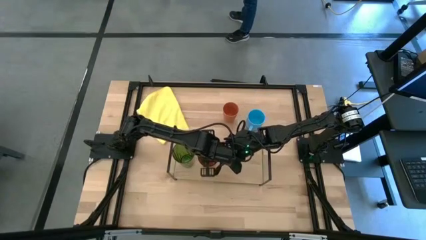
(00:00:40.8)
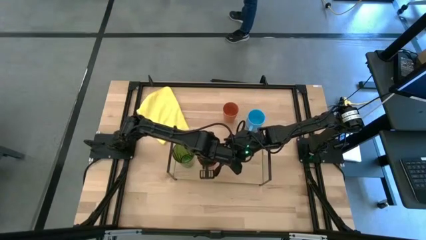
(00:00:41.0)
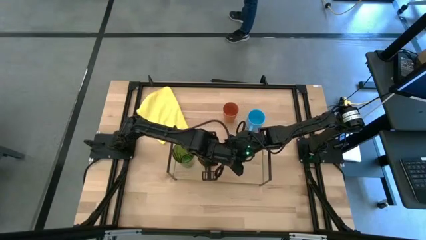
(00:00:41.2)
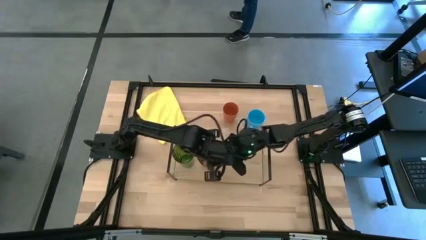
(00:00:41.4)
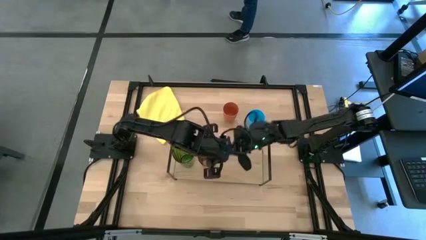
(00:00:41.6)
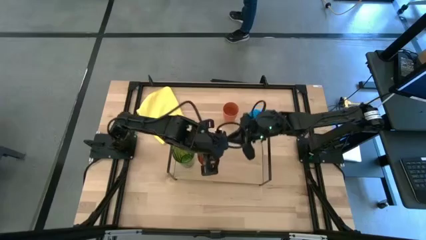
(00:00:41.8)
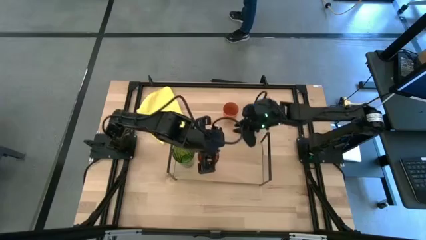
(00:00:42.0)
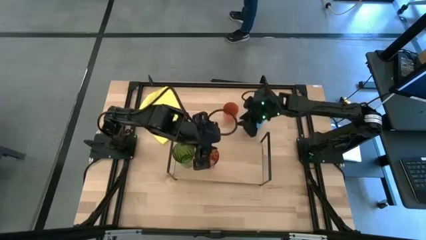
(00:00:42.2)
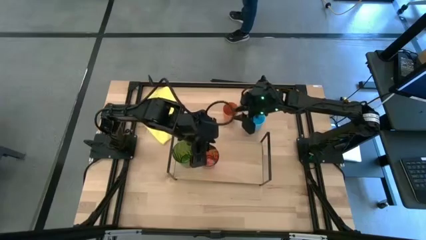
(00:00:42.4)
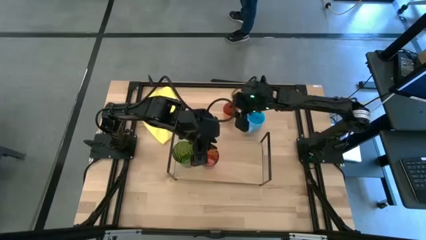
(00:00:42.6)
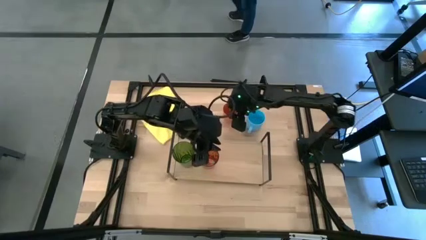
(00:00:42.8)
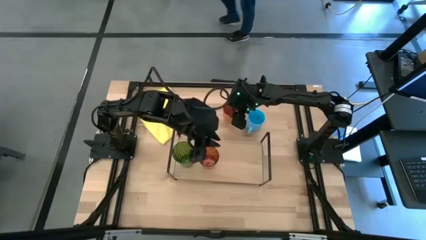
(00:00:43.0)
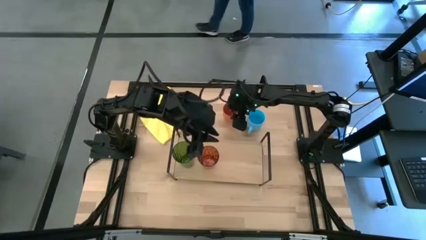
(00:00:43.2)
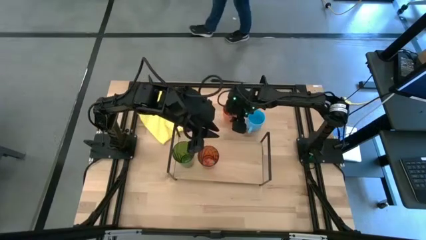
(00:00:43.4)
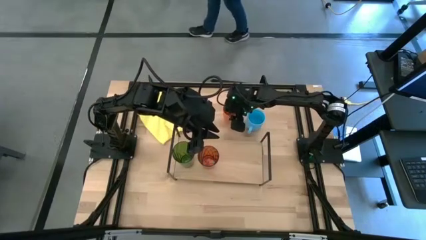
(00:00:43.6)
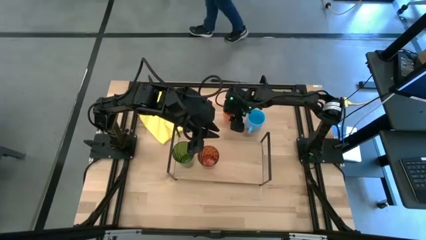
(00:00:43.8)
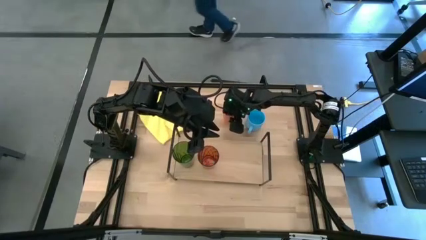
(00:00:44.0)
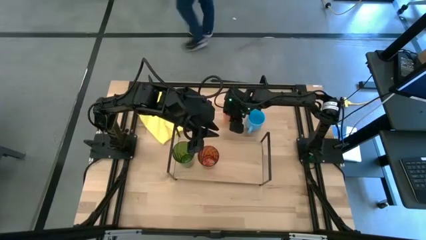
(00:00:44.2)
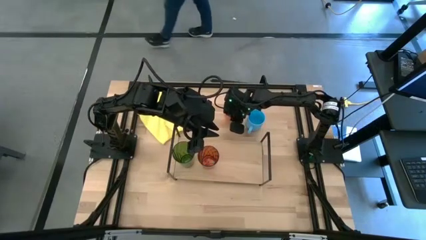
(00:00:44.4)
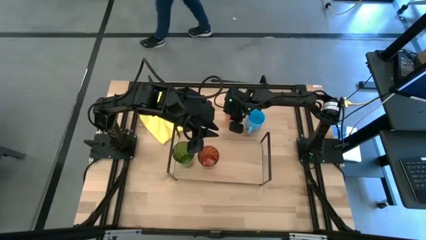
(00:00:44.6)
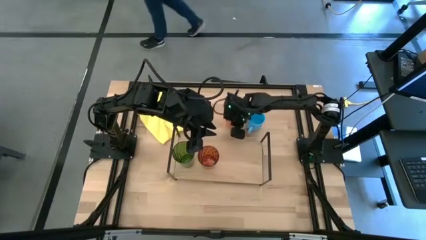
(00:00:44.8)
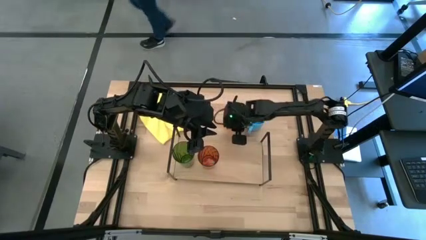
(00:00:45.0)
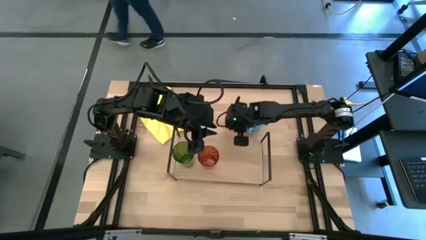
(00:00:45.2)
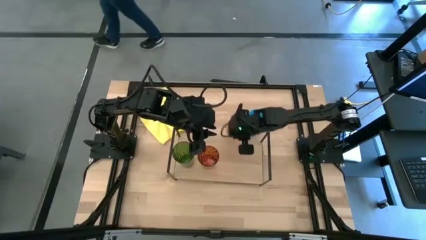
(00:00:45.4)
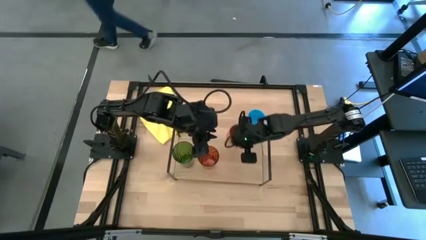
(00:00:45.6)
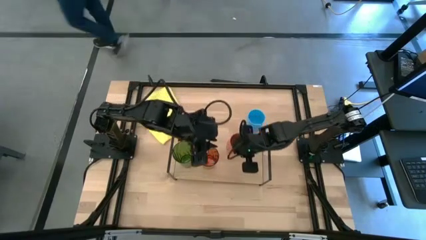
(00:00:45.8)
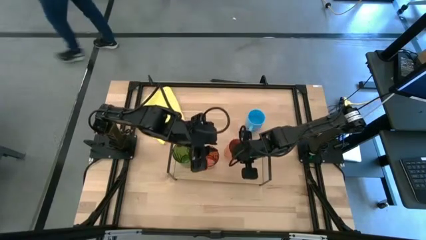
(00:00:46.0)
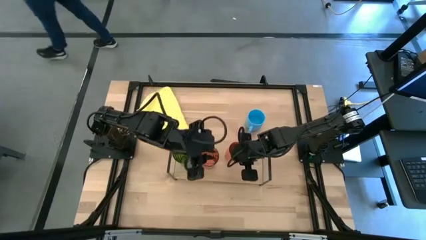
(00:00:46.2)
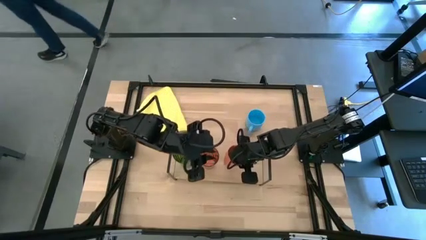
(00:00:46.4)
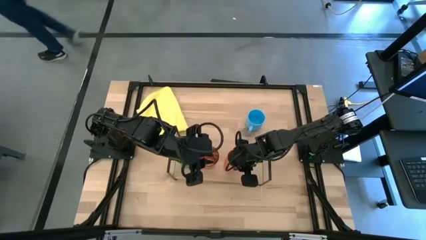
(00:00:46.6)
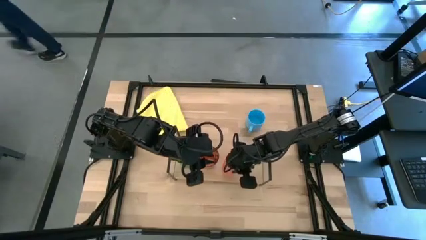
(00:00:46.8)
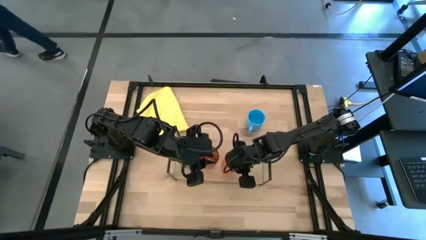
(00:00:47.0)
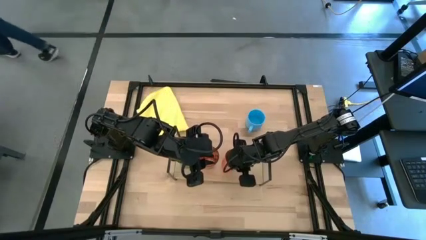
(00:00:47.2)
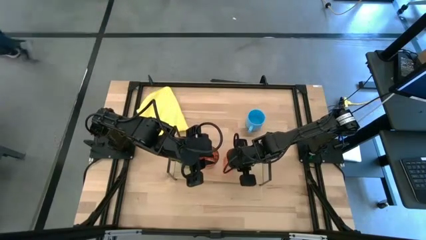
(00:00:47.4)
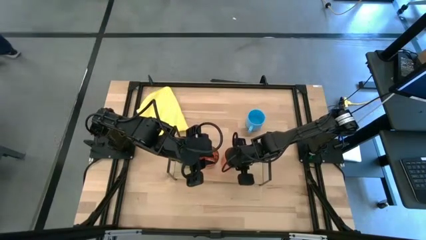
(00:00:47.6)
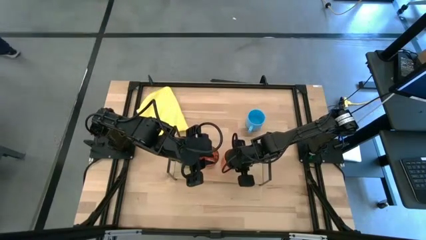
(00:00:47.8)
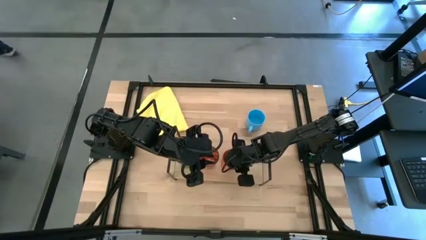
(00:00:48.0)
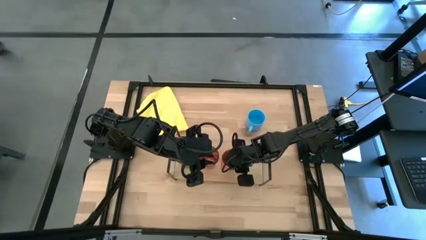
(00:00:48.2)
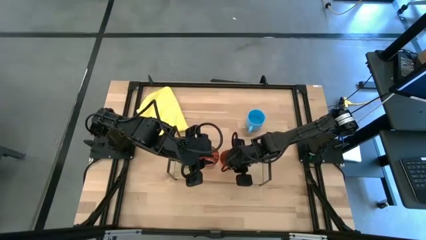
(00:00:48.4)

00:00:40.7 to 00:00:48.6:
Task: Stack small to large cups/mugs on shelf
Put the orange cup on the shelf

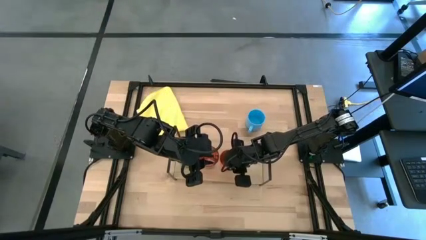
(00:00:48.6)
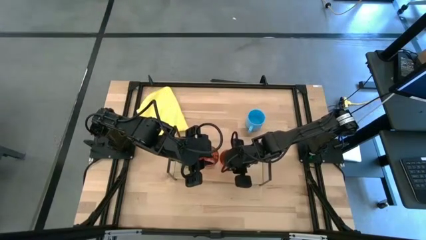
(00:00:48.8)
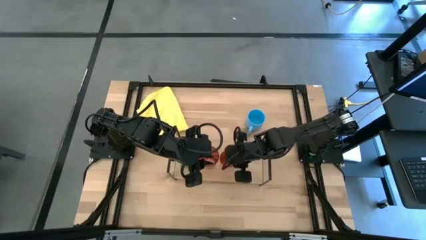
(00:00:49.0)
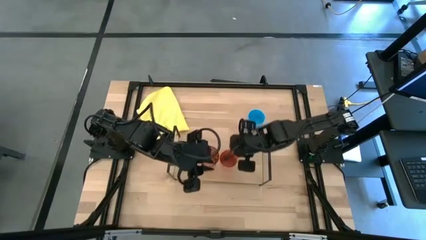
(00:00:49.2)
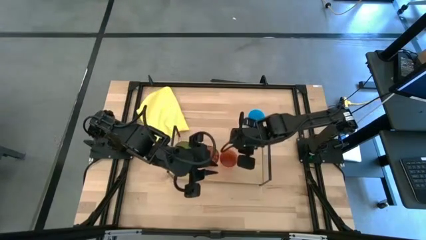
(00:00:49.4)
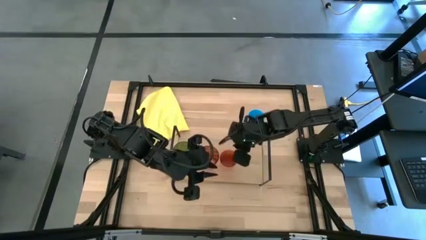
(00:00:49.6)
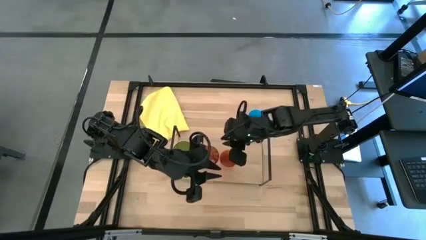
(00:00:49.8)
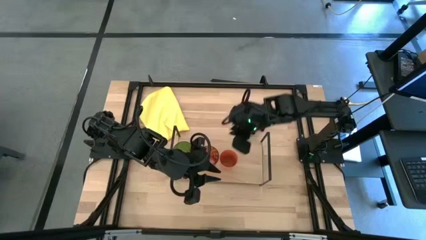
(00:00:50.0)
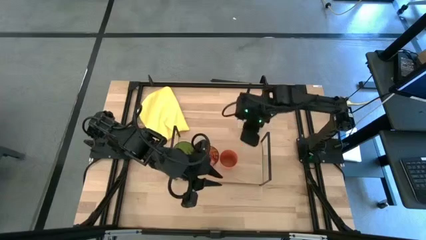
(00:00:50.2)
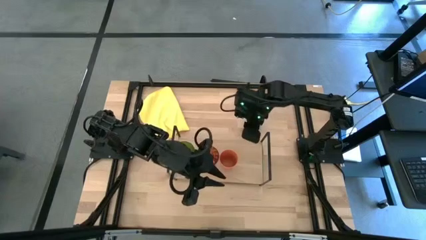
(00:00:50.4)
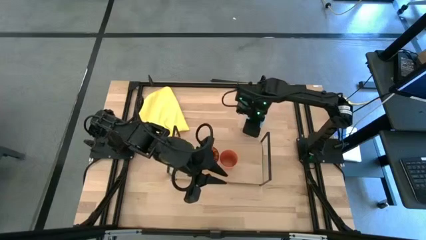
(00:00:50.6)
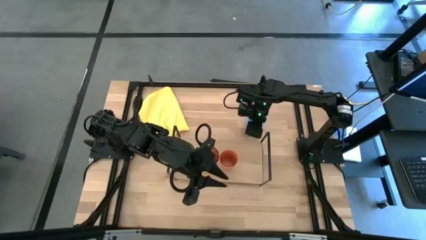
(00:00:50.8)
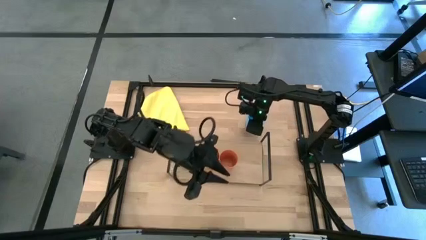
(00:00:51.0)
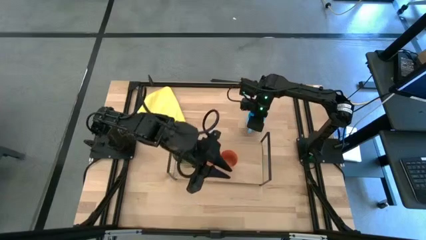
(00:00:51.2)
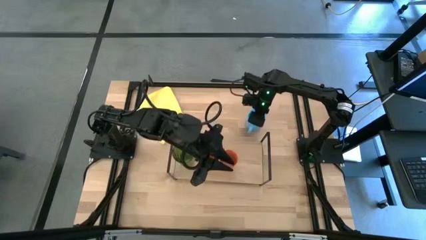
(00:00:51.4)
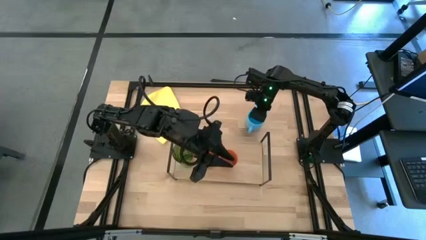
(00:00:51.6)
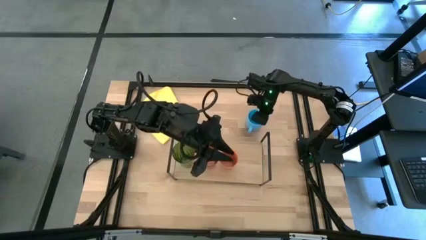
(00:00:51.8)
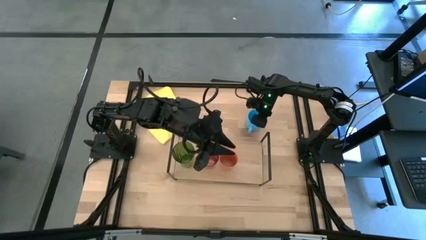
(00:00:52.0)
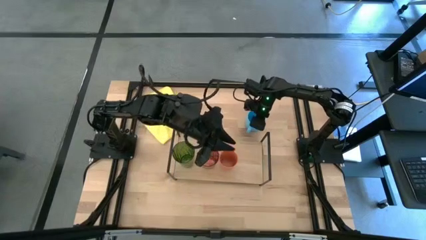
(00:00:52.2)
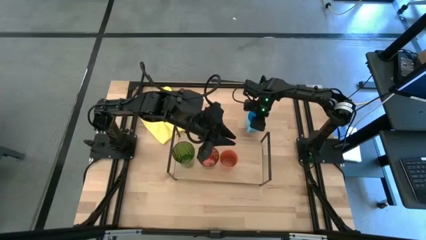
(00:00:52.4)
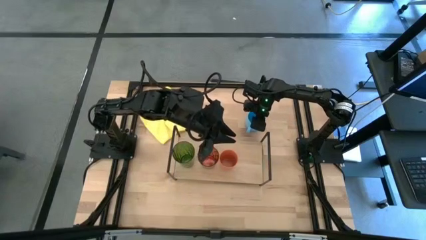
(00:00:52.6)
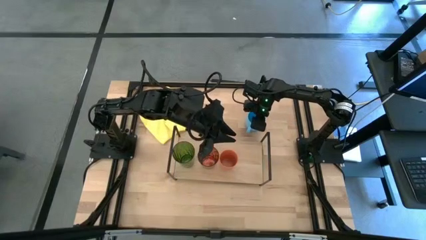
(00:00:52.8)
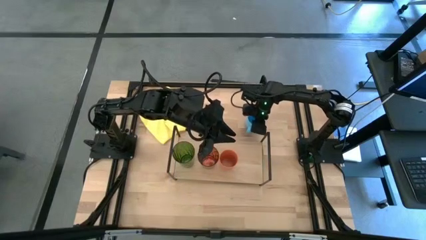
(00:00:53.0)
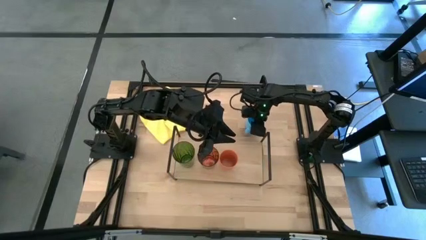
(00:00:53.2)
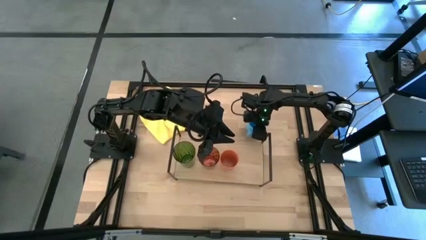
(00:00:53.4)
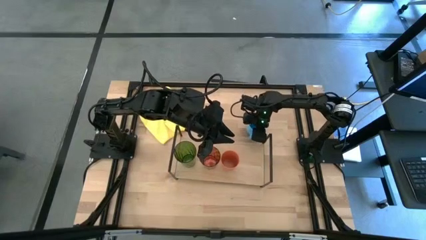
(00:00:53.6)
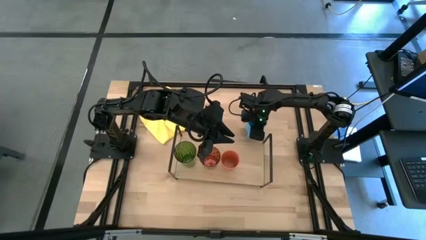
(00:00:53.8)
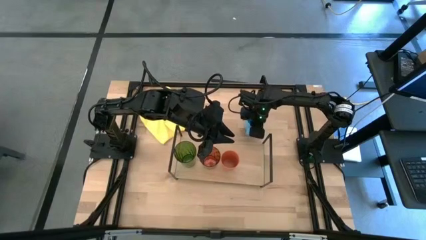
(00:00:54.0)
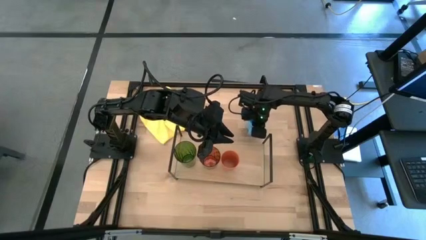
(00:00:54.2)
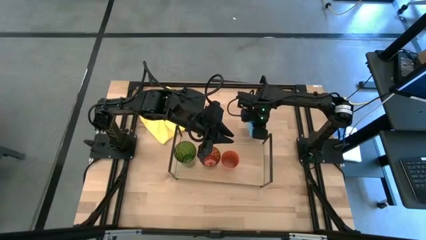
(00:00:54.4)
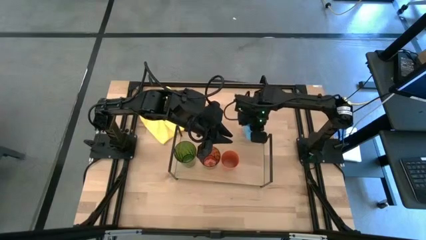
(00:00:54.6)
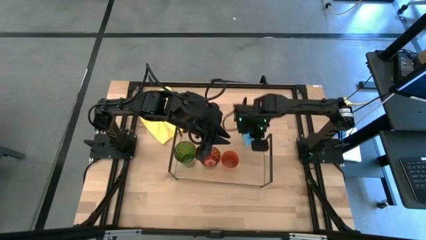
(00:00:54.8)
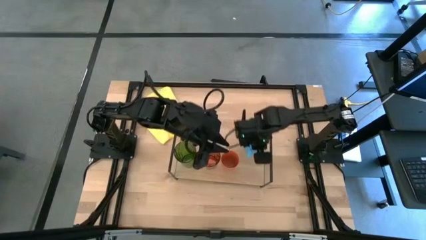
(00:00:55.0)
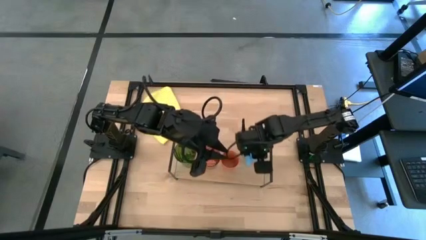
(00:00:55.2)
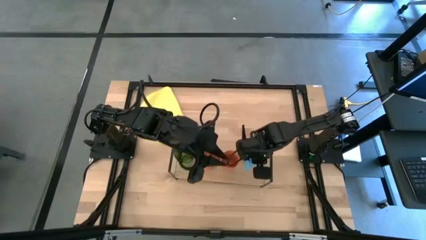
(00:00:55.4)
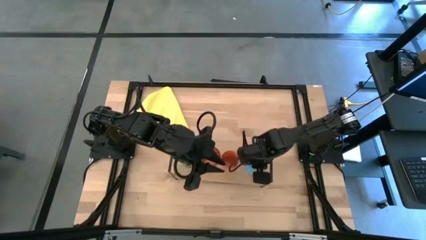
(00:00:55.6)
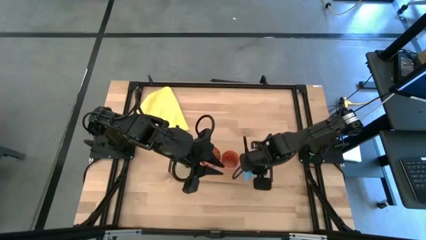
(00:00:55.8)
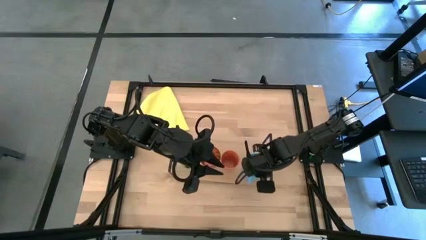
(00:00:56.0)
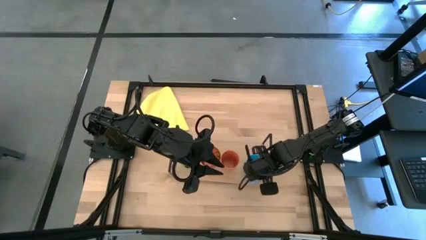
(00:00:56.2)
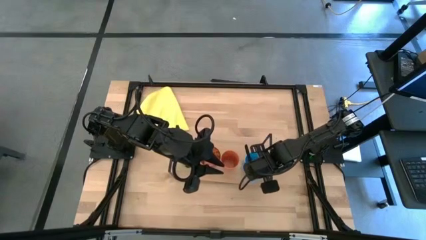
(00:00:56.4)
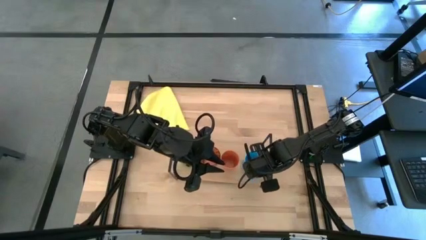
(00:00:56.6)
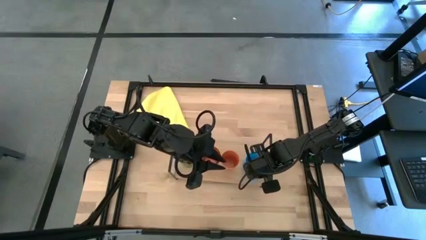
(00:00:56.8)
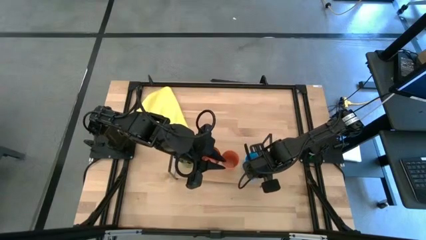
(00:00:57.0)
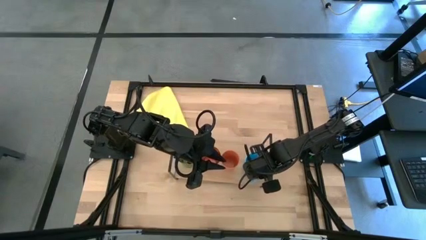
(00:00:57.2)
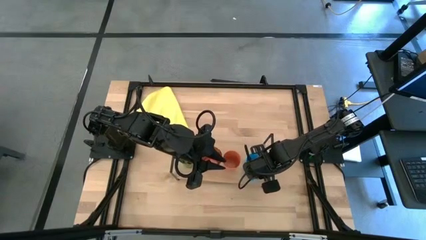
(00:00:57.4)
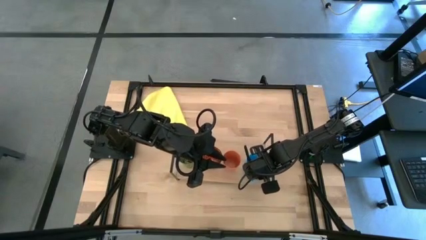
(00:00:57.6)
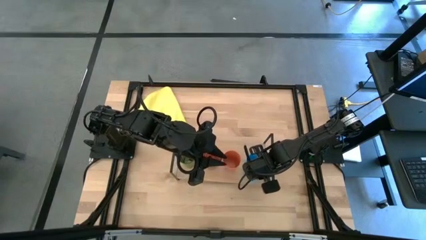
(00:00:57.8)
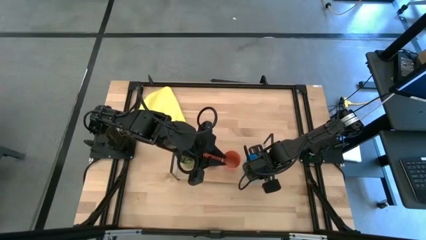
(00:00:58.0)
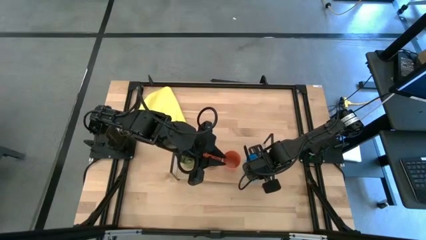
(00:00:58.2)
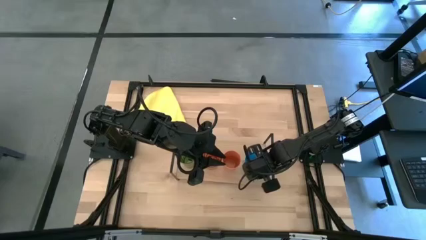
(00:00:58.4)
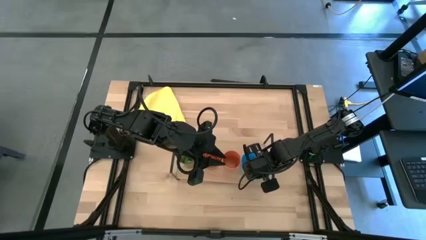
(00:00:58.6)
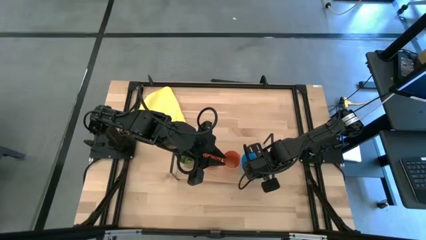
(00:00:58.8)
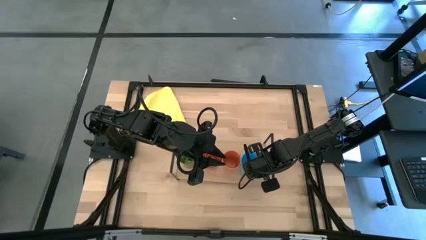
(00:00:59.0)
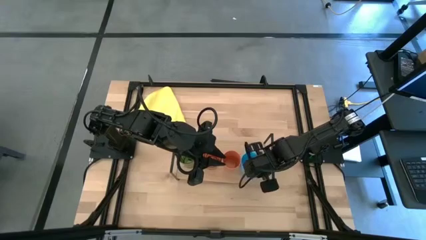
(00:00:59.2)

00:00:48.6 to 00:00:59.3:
Put the blue mug on the shelf
